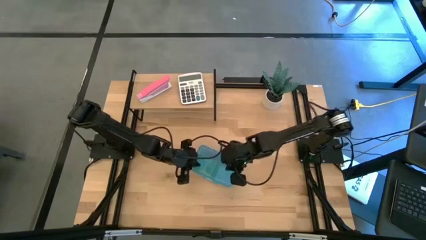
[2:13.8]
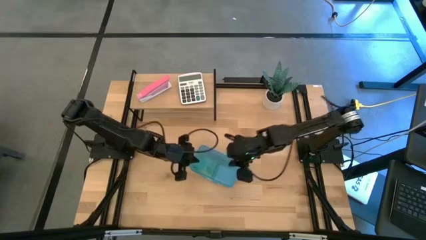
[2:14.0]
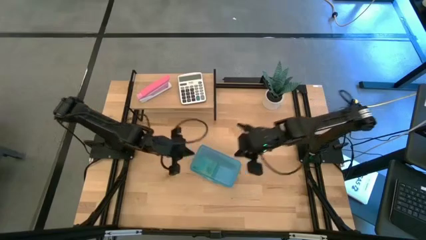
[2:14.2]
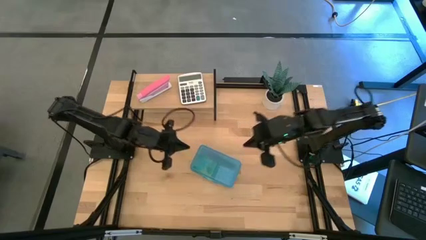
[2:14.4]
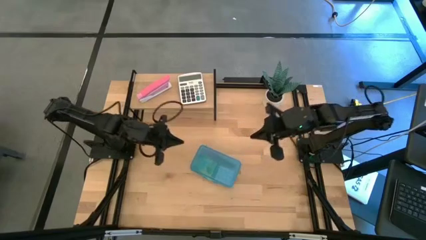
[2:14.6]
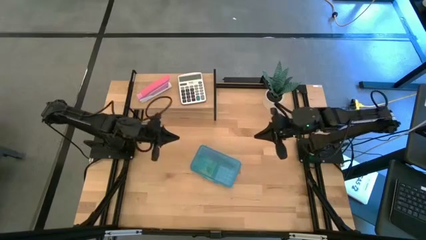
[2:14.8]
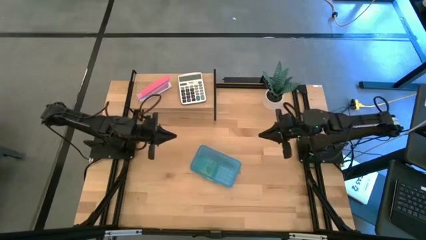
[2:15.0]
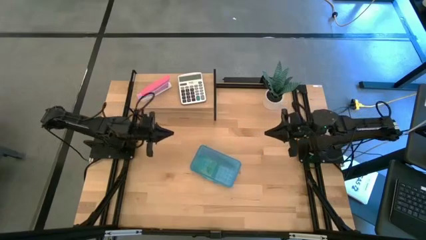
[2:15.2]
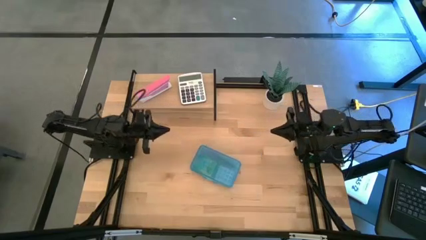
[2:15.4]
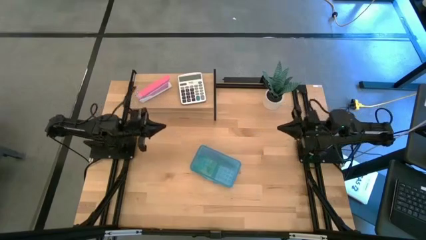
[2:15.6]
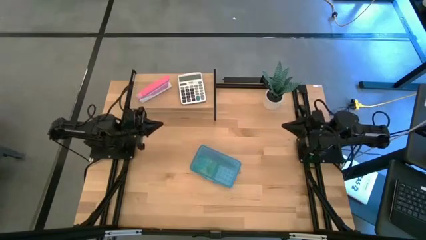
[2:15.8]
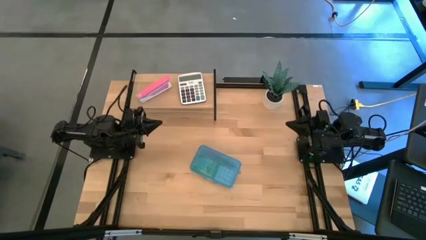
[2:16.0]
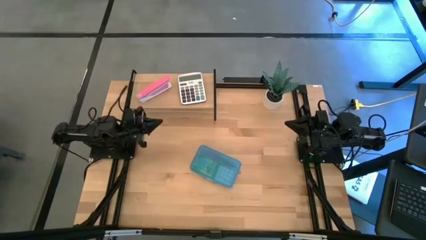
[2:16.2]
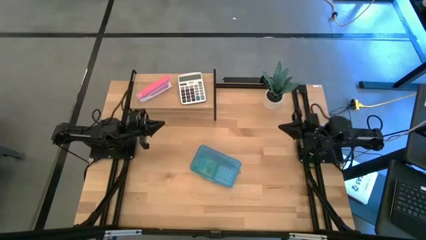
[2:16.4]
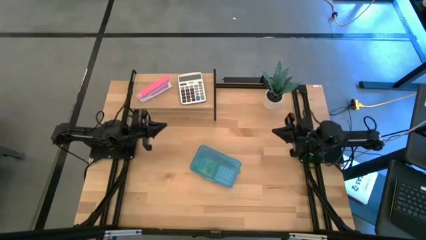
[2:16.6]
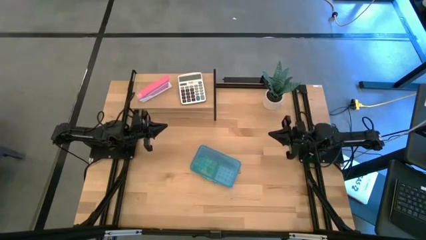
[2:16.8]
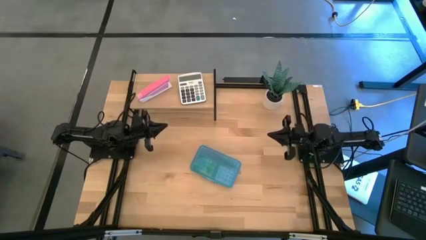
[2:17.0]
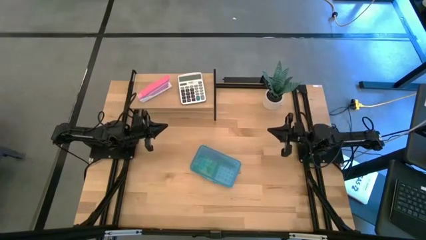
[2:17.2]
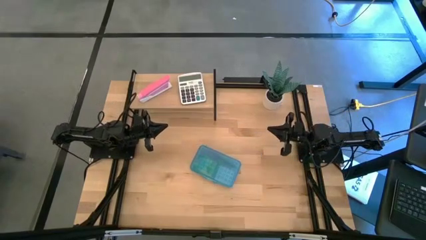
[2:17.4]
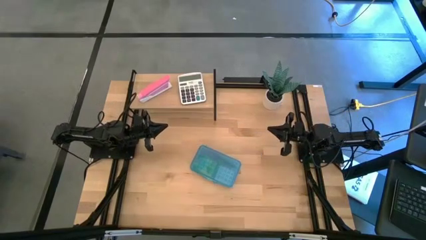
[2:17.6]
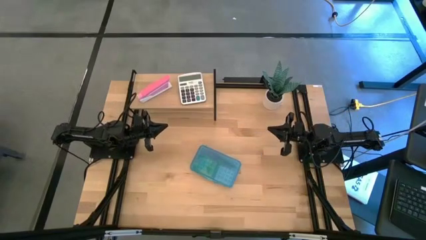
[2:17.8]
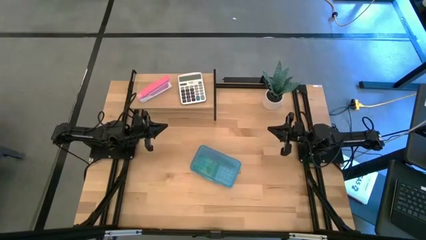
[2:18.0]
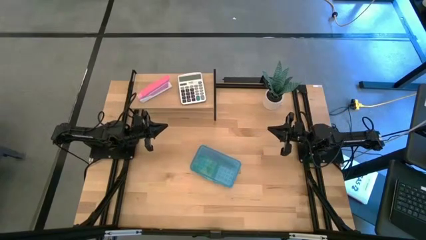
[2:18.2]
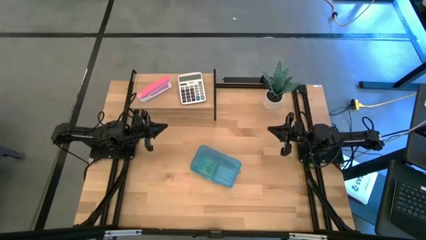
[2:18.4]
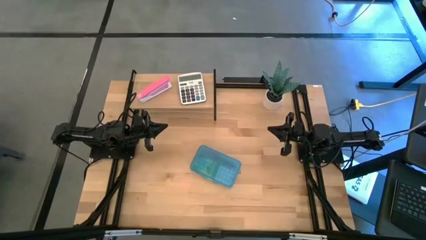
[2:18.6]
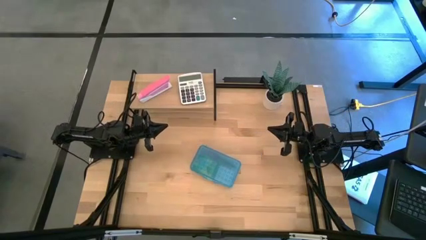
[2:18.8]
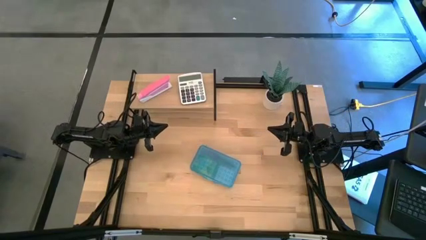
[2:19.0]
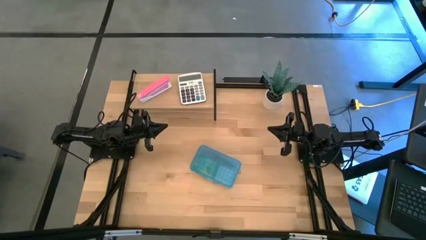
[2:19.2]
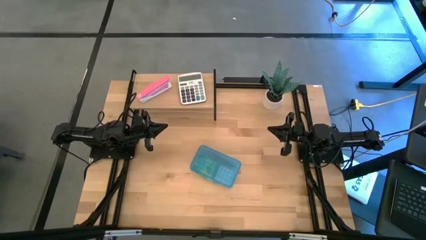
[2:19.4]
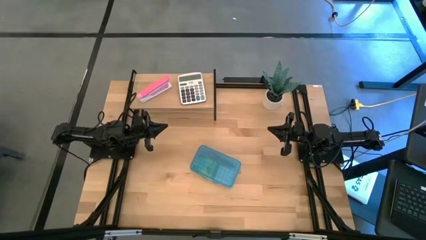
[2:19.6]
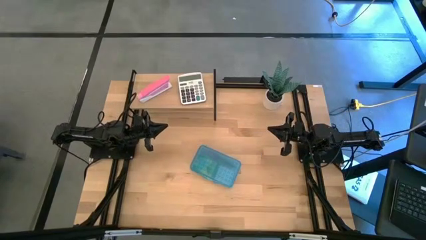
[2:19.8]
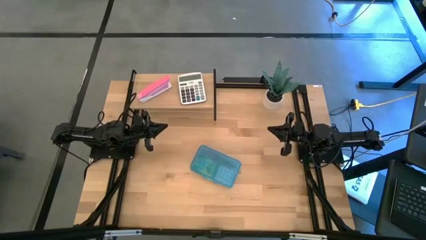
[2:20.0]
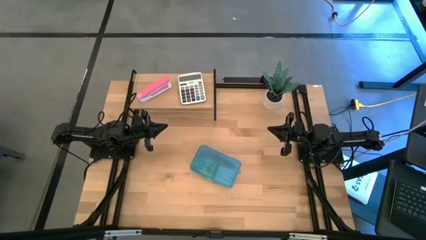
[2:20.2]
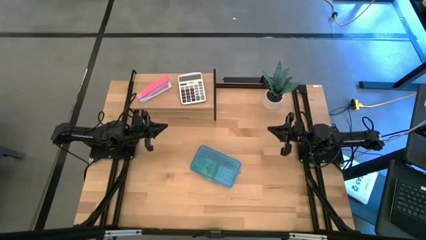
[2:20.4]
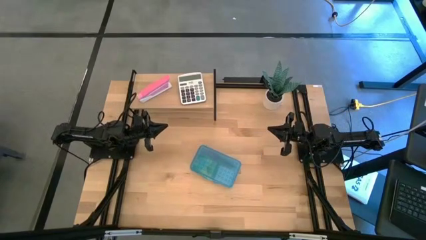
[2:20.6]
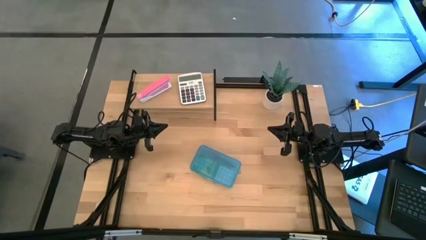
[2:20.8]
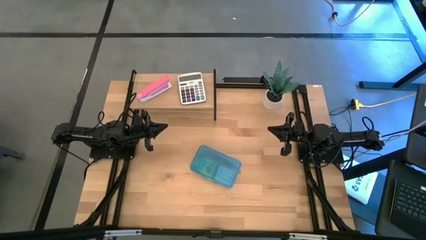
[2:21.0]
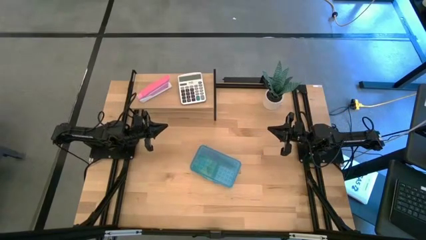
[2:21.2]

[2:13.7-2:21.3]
Task: Pack school essentials
Return to Home Position

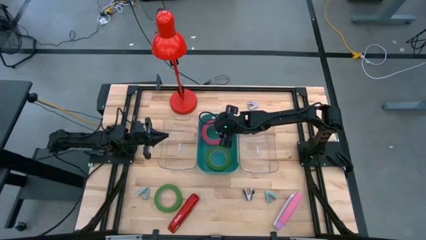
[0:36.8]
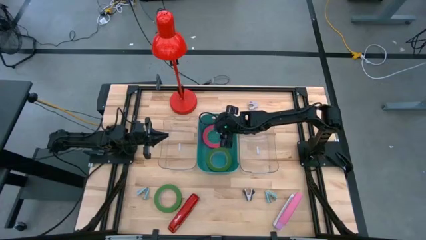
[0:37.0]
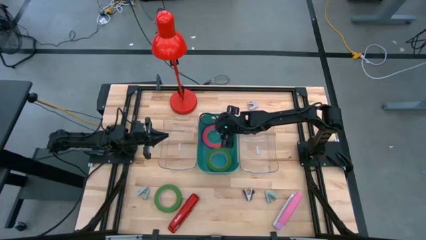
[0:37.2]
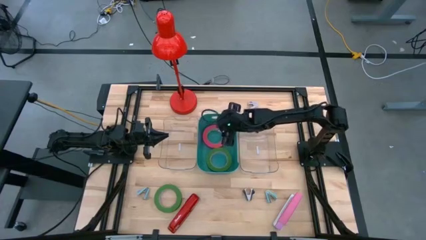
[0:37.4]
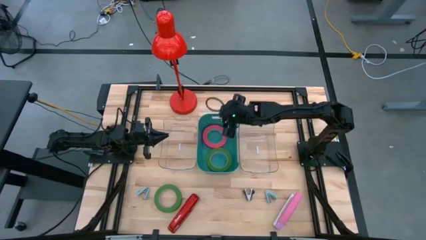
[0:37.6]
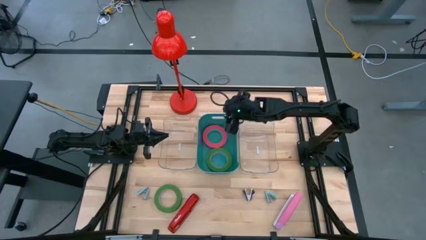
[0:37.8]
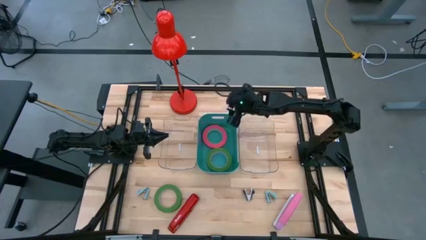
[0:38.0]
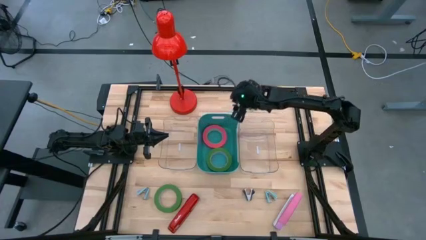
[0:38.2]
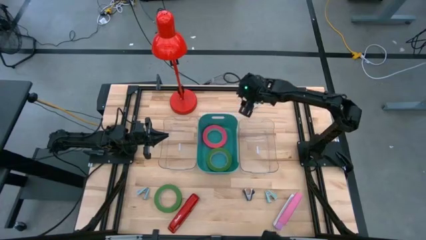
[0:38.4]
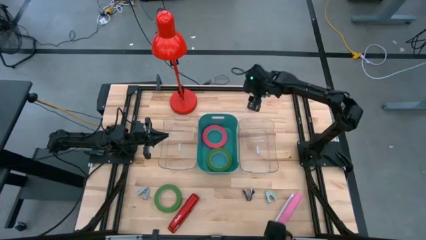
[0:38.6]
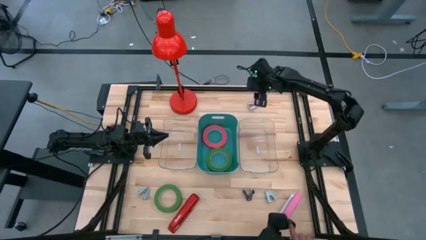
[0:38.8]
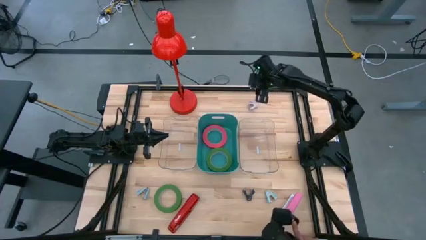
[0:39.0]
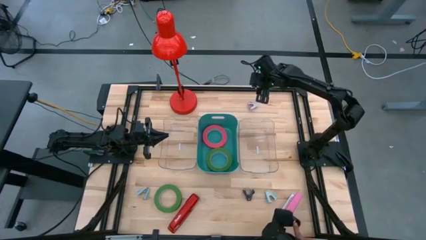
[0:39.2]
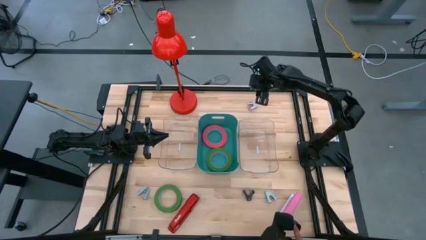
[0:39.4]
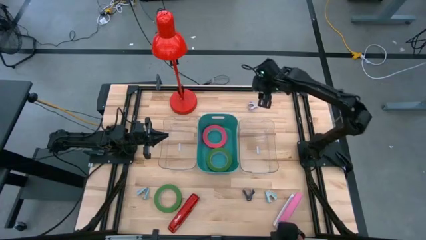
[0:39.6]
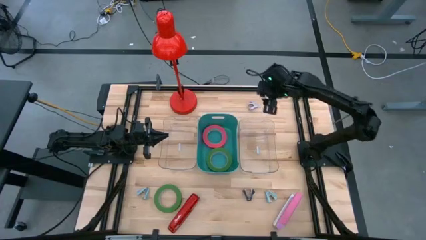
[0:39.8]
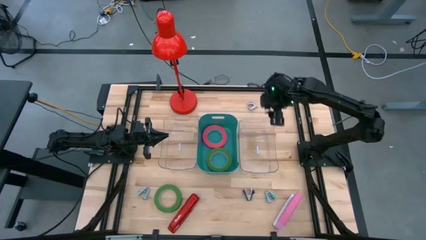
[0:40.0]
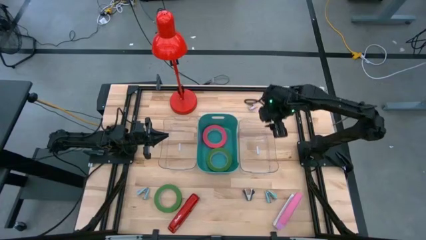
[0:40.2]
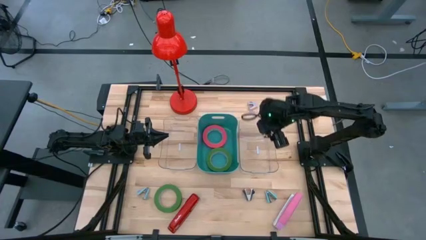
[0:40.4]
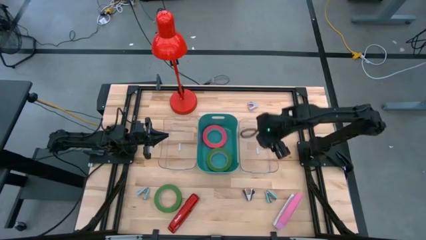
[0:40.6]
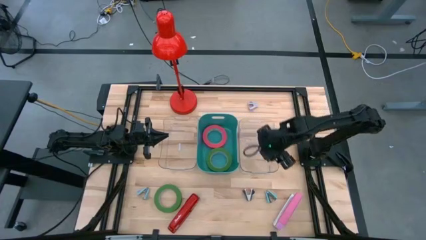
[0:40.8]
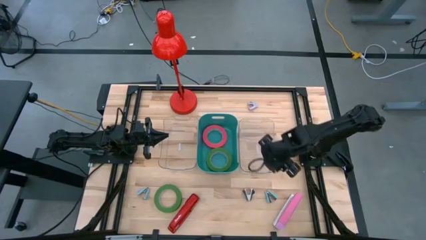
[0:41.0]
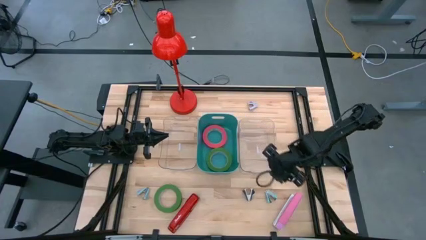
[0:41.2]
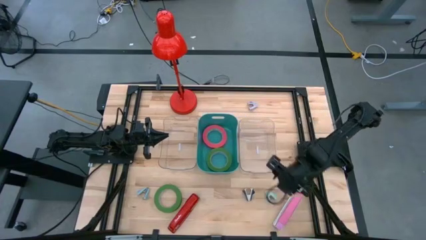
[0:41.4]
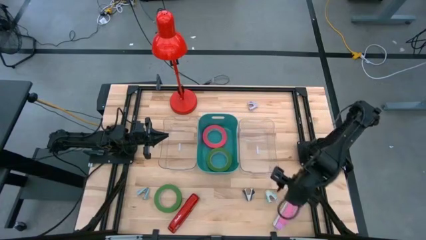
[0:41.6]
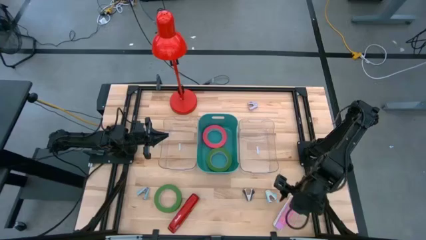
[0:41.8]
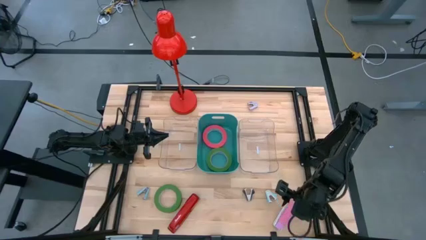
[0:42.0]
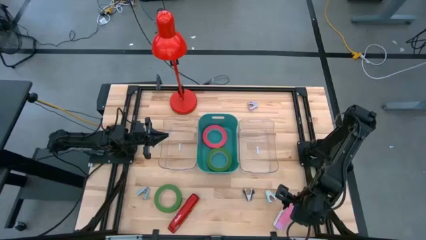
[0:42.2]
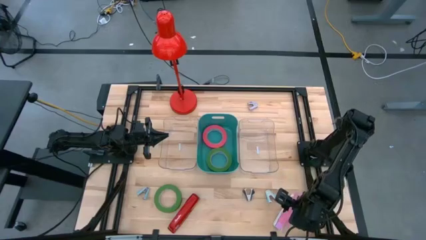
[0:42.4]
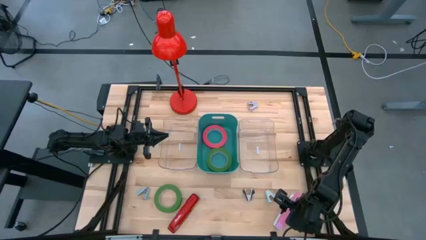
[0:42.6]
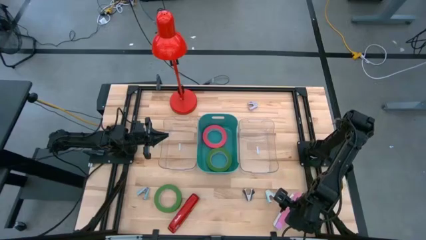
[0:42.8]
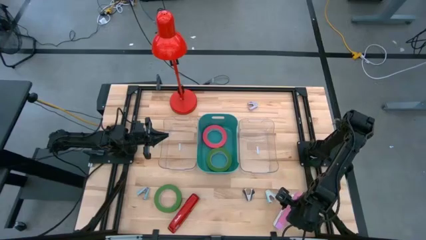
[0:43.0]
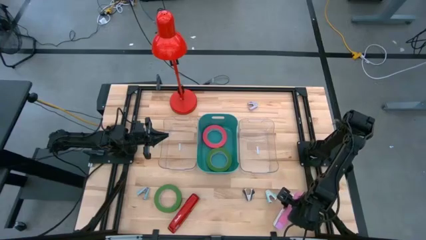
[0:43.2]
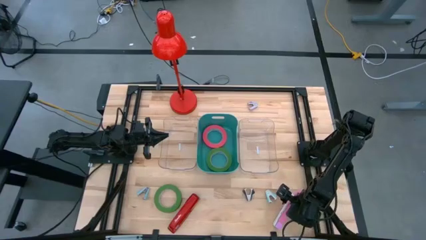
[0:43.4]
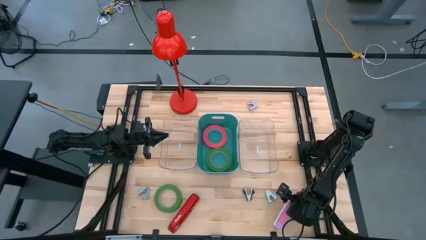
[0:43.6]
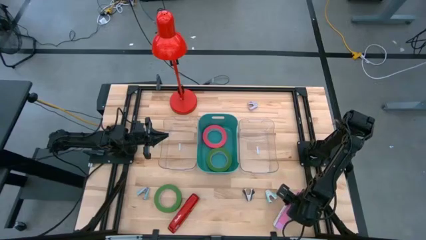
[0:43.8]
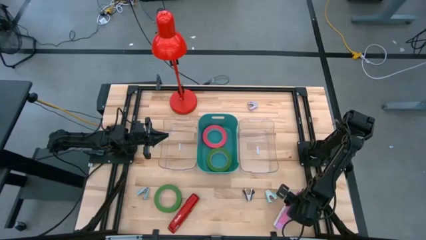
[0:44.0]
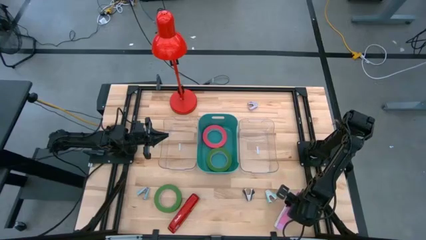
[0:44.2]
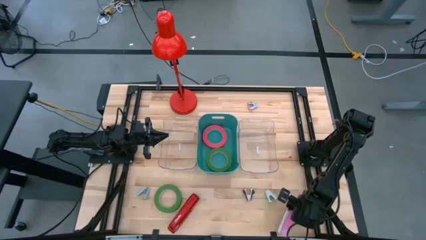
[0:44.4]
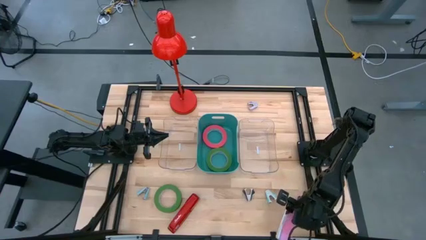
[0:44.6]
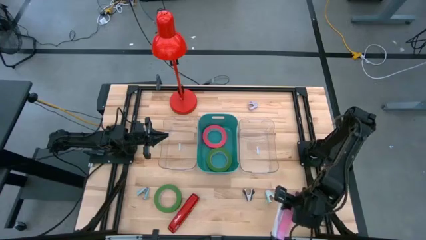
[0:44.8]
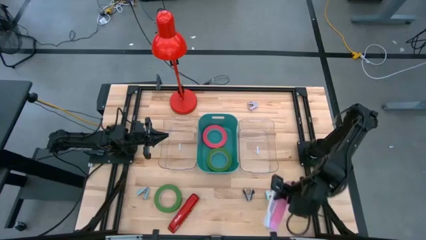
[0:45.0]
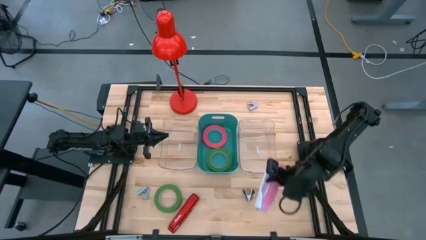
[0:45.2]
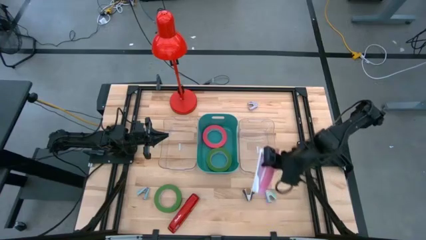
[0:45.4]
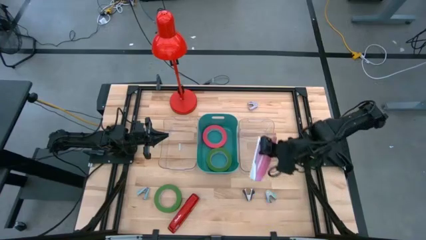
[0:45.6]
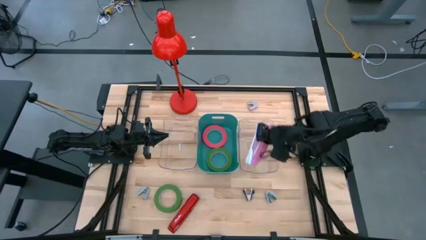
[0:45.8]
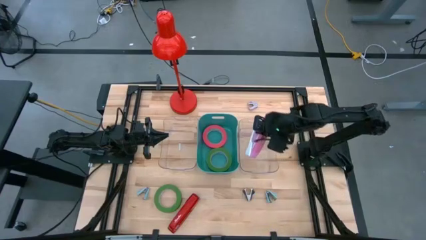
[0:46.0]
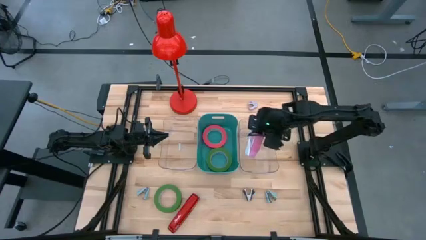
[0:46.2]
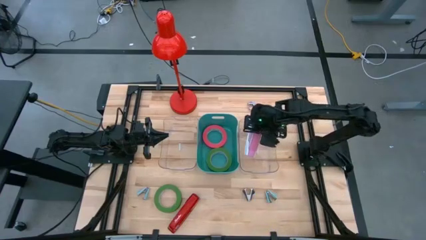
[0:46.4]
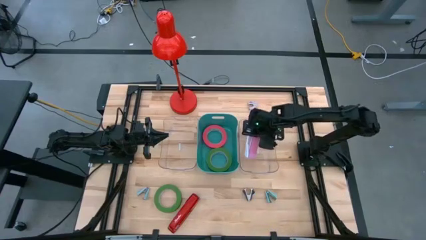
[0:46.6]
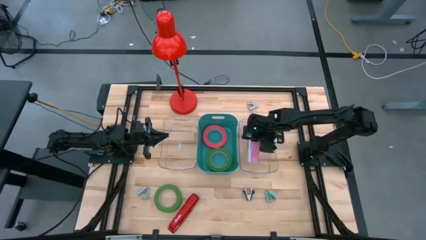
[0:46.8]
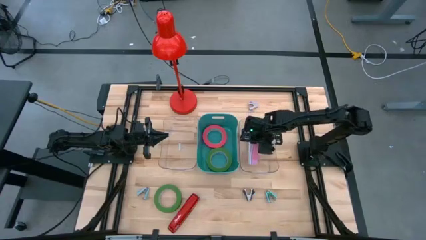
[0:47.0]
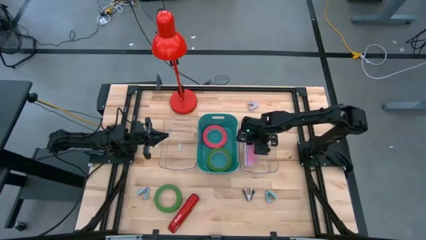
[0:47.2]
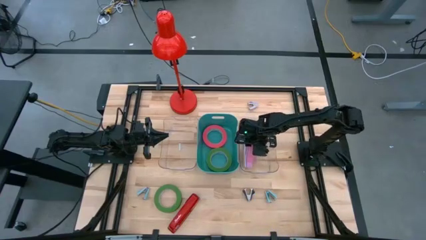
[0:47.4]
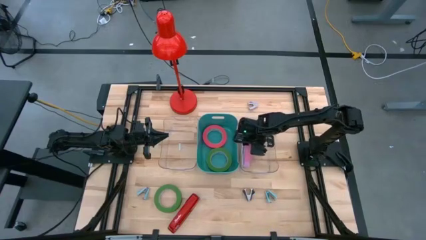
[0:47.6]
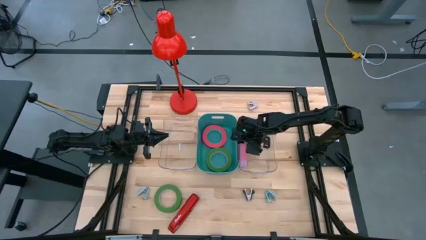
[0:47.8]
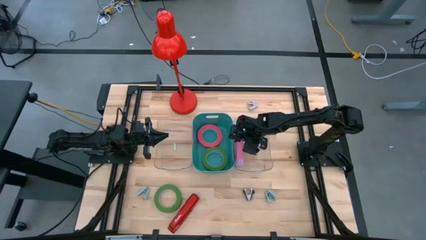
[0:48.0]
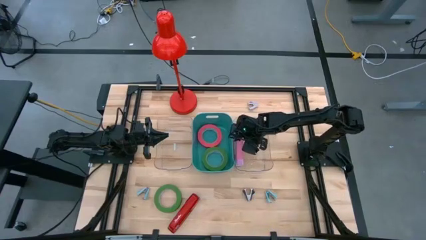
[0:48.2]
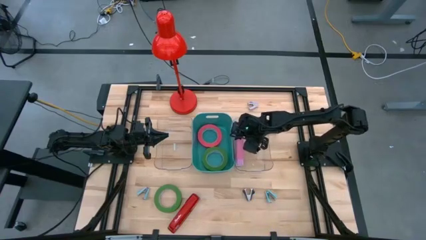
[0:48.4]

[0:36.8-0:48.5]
Task: Pick and place Stapler, Stapler remover, tape
Put the pink stapler into the right transparent bin
